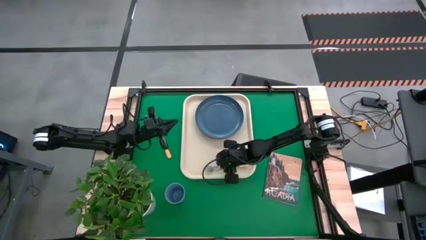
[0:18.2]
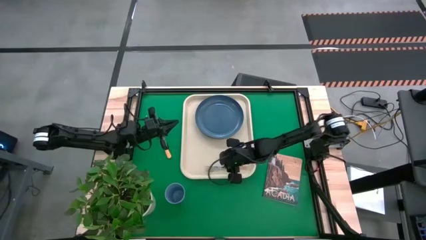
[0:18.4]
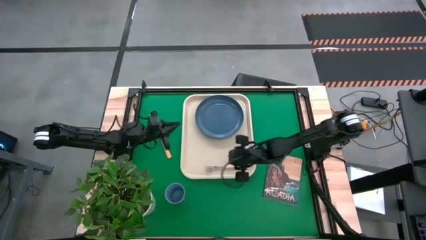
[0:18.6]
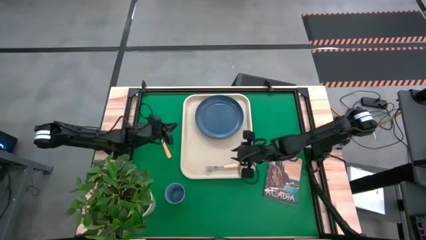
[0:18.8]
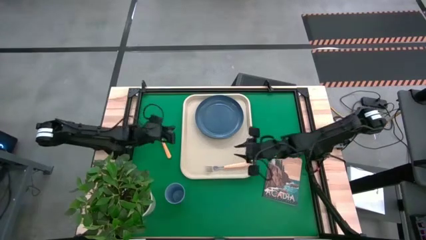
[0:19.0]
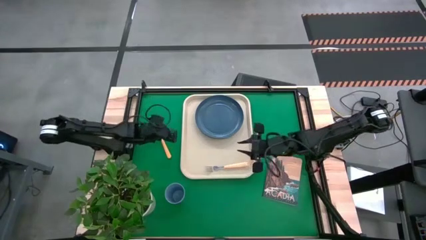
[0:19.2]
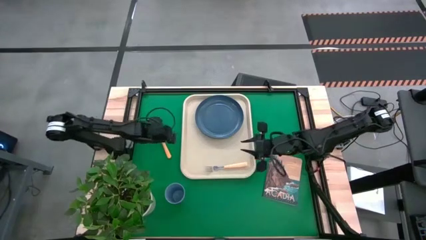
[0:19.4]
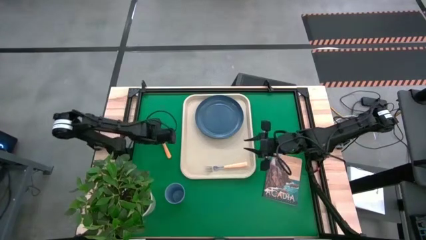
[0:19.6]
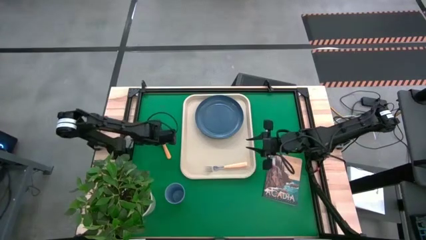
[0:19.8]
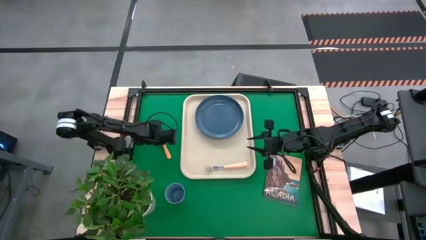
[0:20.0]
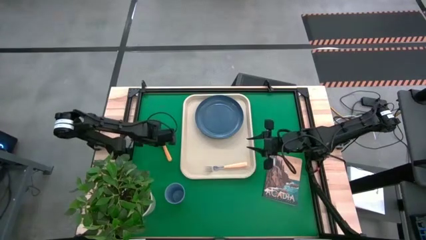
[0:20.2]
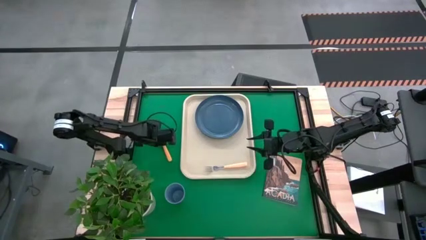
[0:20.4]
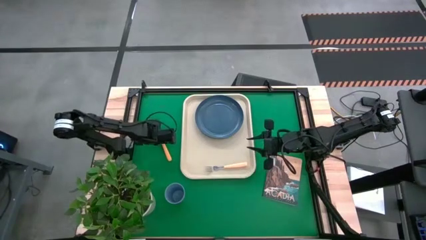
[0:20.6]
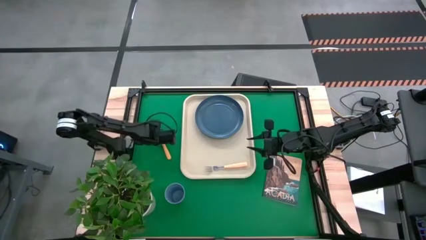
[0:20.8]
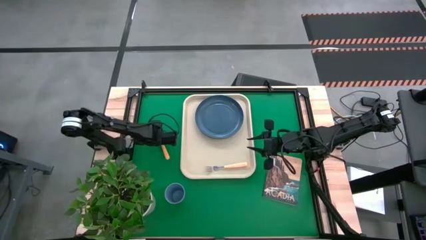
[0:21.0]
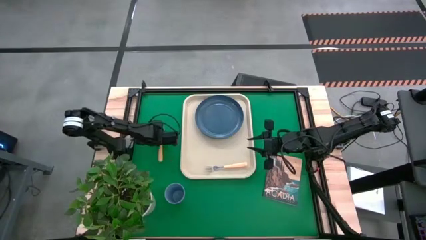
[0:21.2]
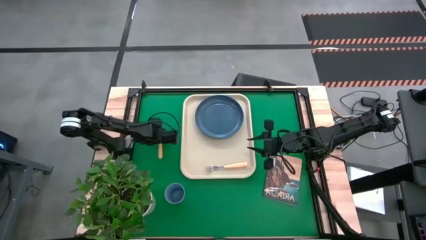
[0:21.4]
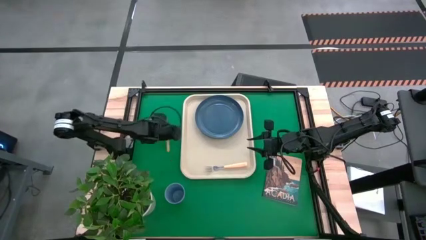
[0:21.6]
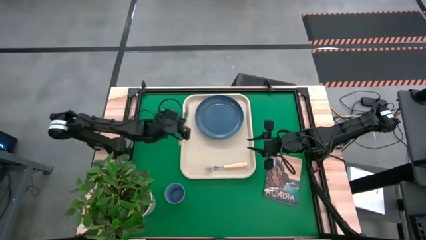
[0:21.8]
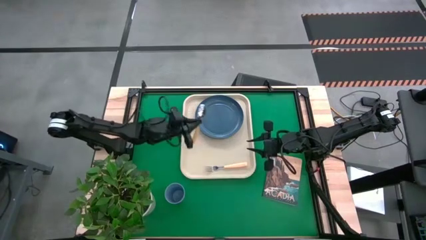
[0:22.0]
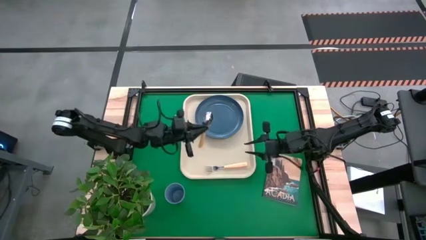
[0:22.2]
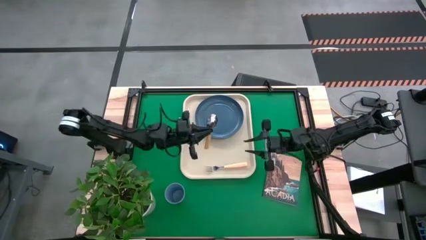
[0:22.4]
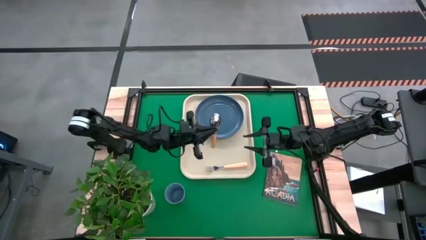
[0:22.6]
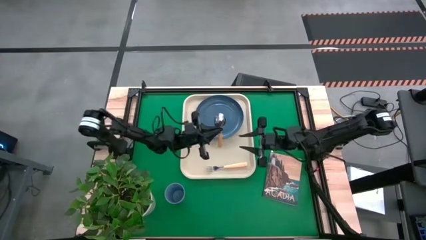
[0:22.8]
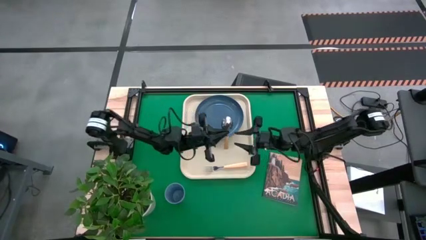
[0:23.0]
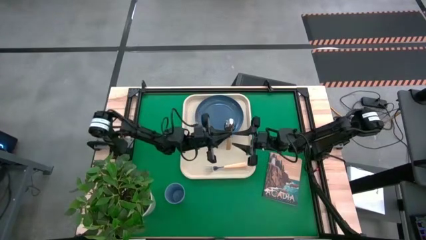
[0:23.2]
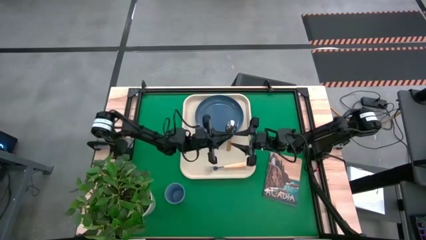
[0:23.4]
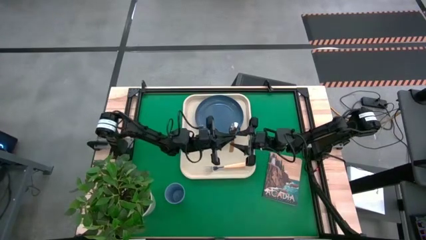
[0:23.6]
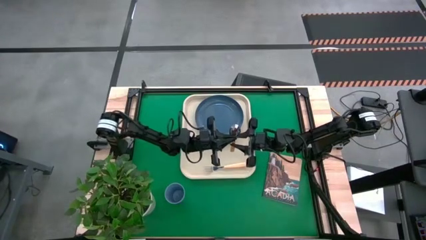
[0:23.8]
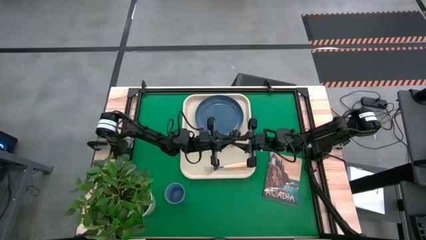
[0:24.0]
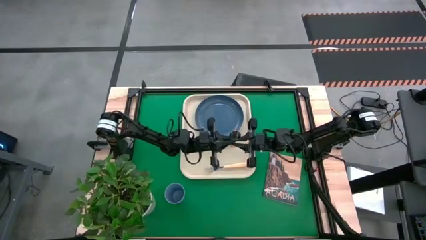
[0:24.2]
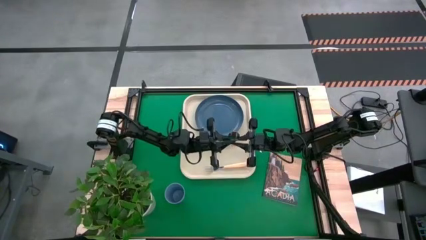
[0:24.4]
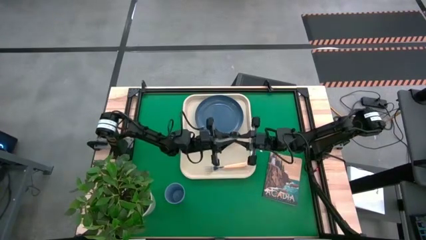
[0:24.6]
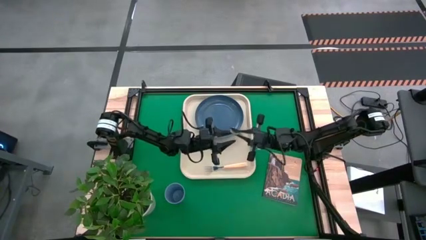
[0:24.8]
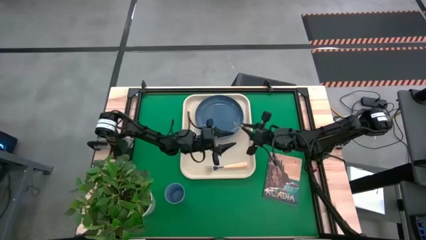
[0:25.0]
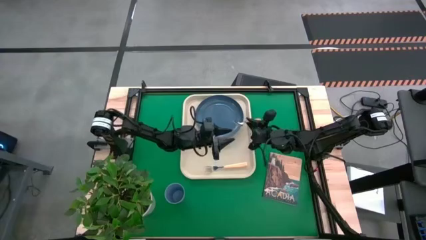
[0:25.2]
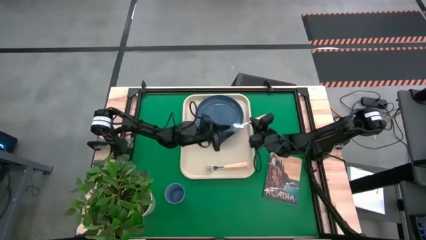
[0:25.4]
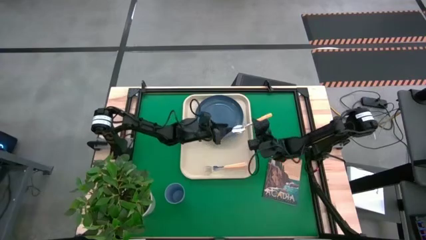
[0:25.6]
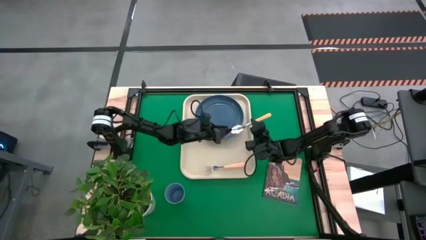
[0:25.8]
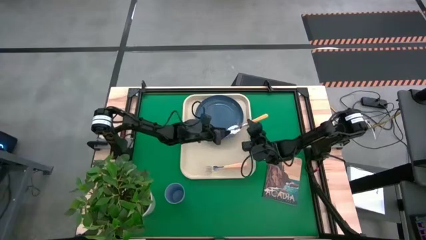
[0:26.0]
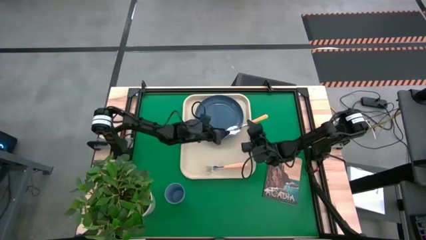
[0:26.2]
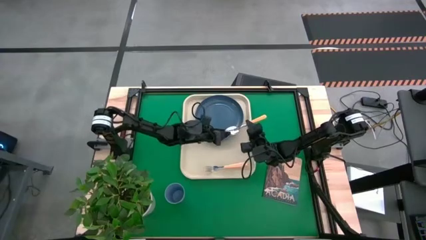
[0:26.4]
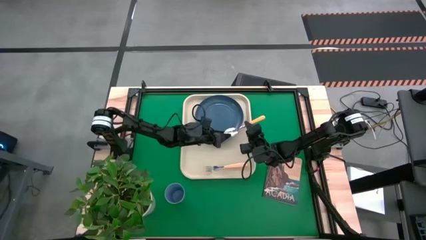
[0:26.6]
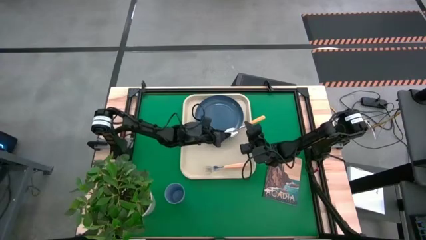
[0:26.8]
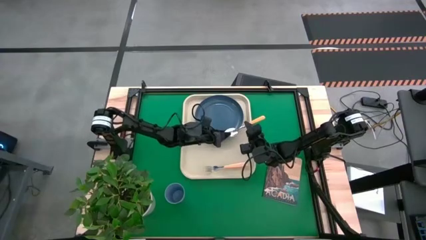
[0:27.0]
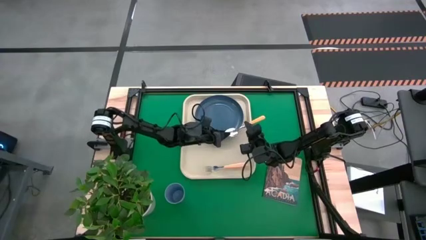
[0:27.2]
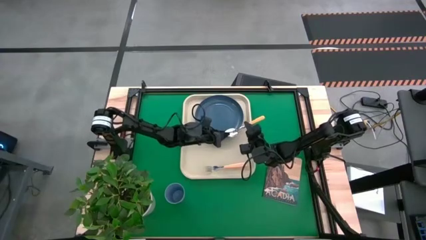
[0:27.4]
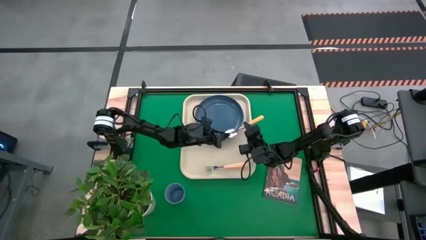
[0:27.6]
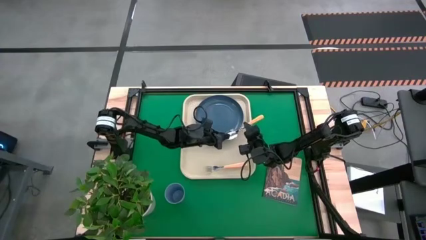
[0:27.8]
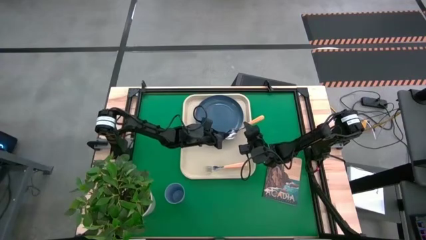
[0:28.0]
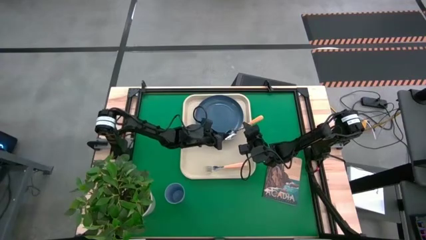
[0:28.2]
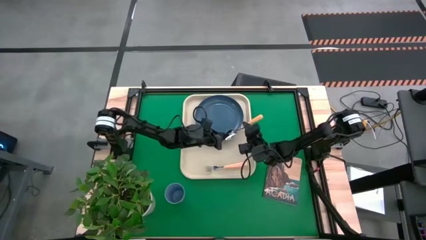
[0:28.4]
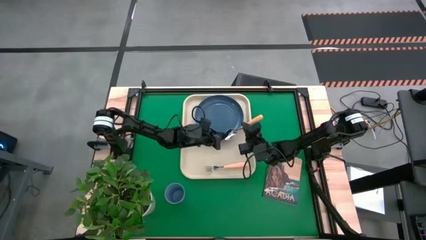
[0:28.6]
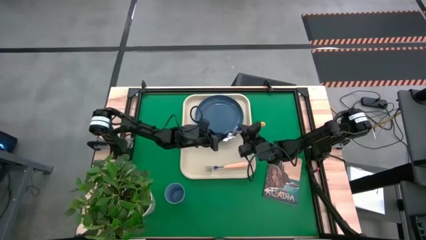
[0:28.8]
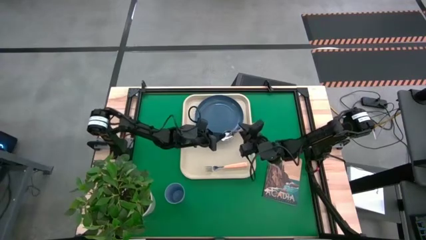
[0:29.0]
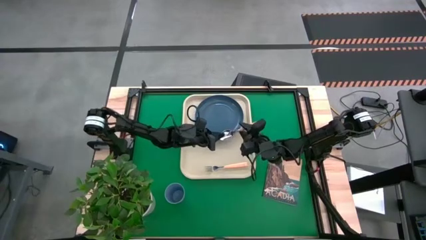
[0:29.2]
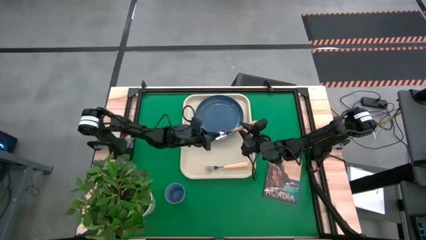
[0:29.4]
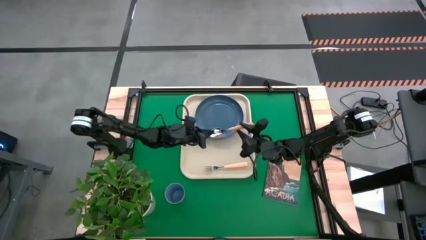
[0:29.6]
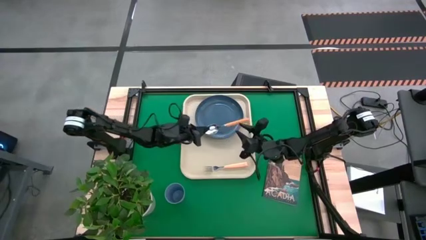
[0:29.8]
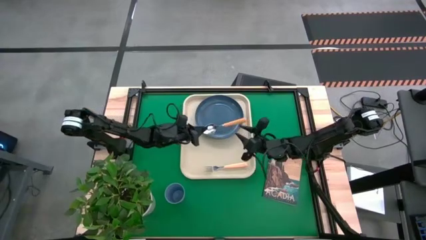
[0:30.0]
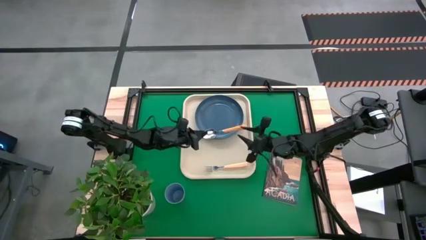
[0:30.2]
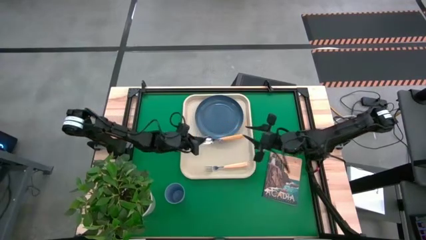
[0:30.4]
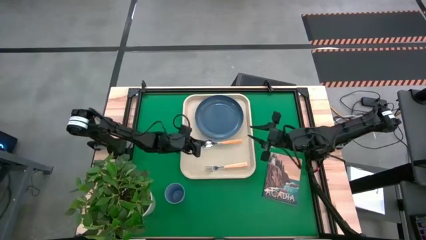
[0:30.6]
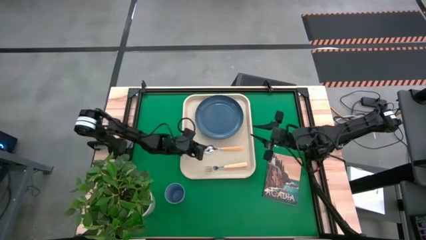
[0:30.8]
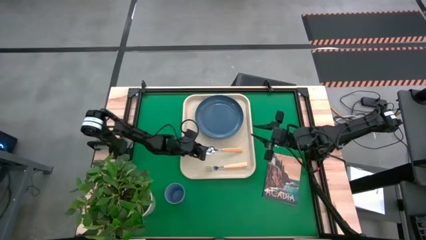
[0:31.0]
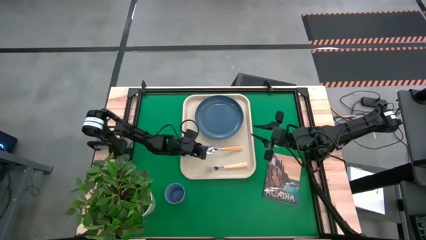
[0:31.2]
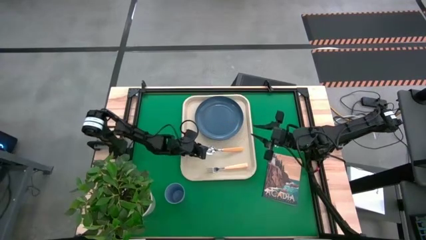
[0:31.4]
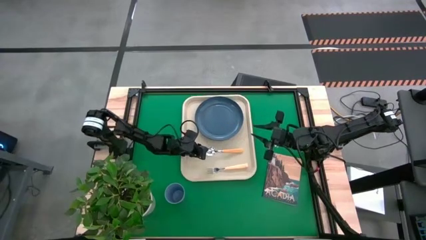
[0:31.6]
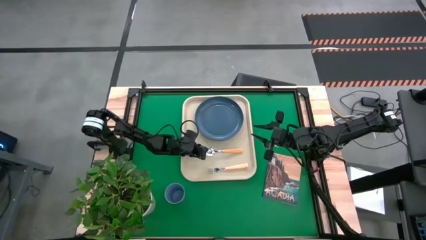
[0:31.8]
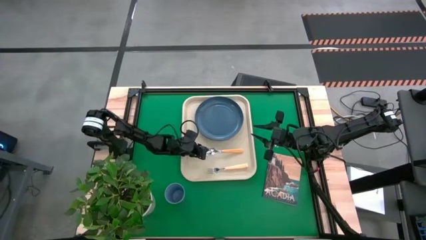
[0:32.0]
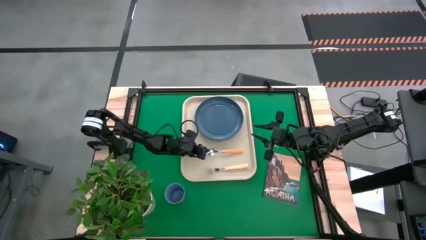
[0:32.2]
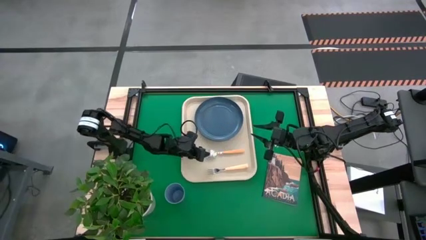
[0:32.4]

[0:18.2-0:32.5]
Task: Pick and place plate/cup/fork/spoon on tray
Put the orange spoon on the white tray to the left side of the blue plate
